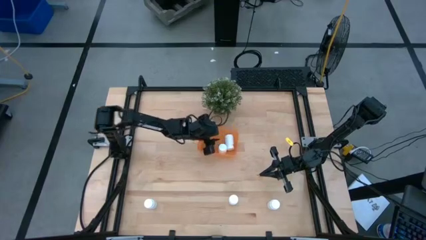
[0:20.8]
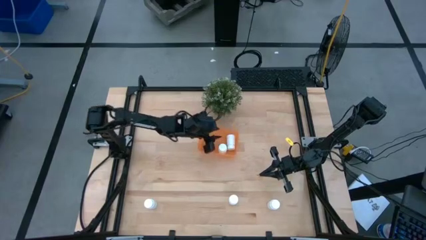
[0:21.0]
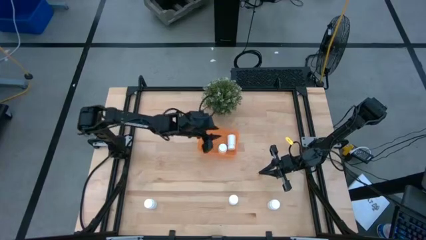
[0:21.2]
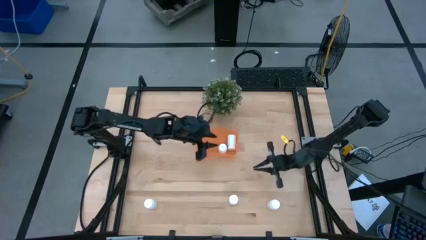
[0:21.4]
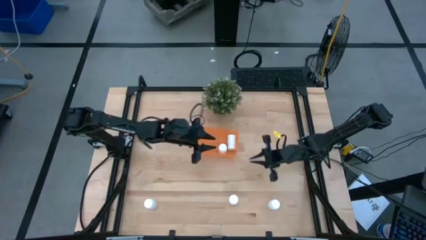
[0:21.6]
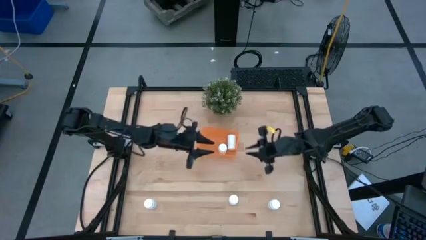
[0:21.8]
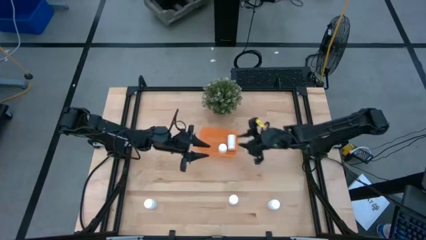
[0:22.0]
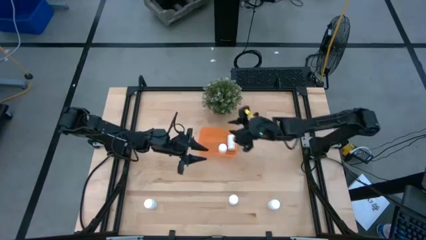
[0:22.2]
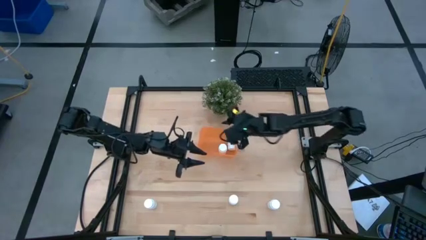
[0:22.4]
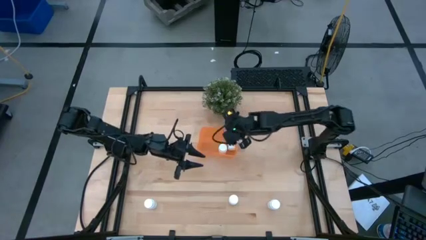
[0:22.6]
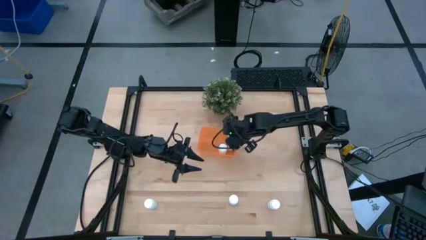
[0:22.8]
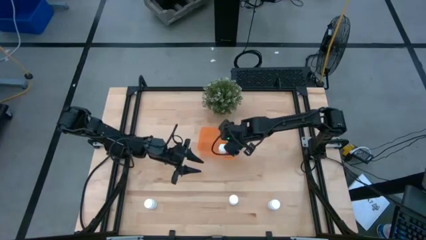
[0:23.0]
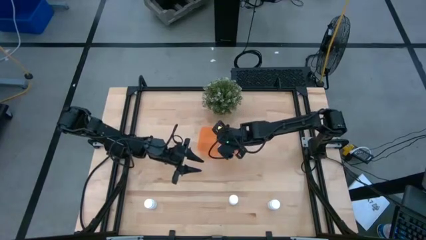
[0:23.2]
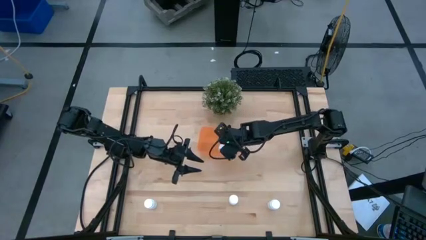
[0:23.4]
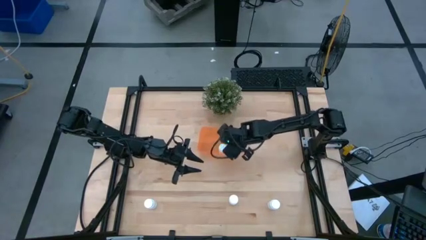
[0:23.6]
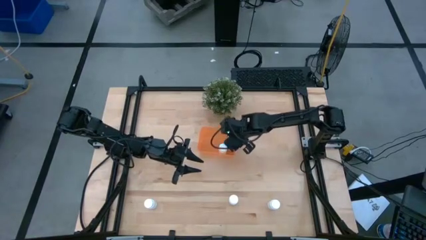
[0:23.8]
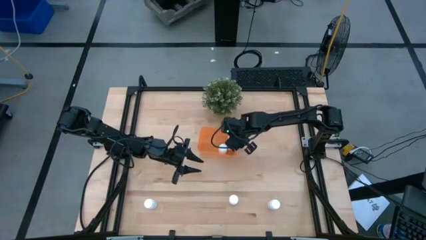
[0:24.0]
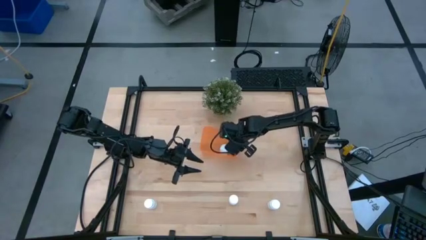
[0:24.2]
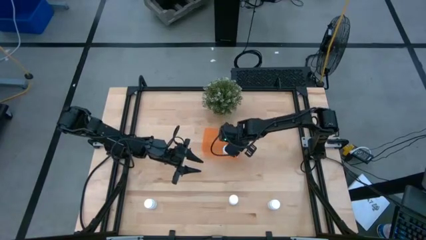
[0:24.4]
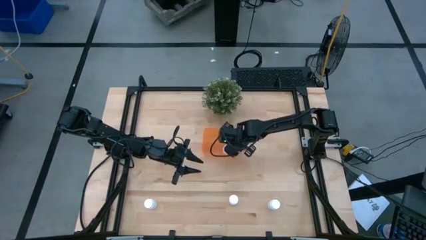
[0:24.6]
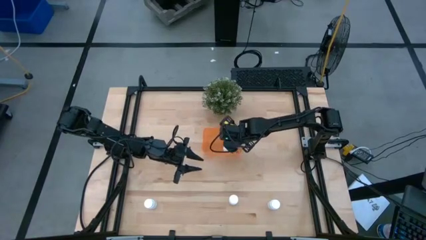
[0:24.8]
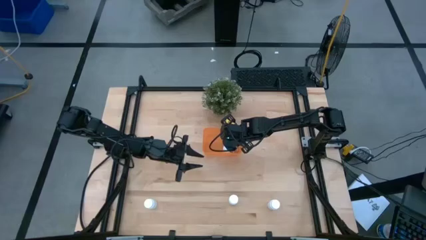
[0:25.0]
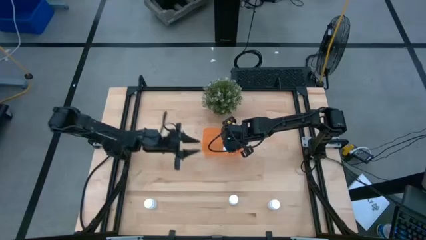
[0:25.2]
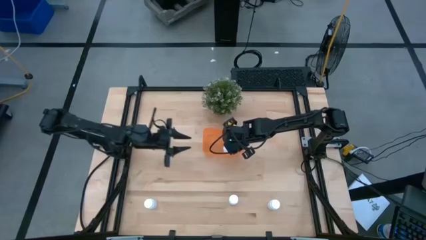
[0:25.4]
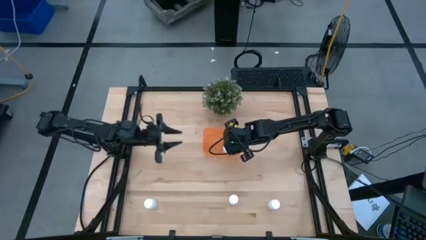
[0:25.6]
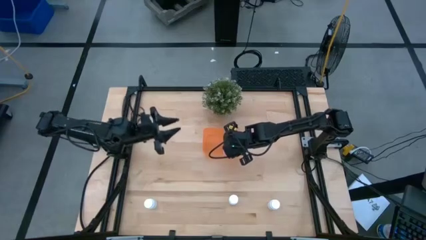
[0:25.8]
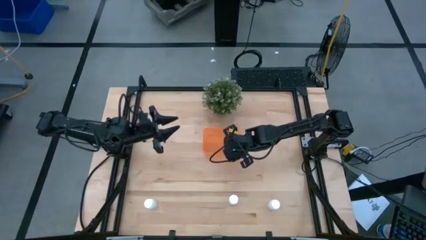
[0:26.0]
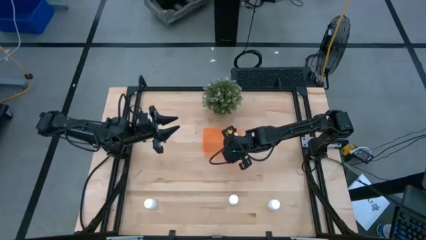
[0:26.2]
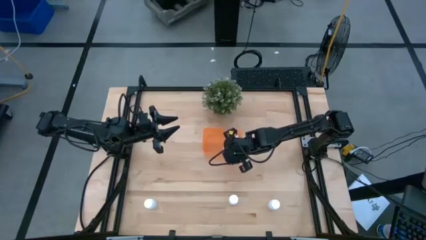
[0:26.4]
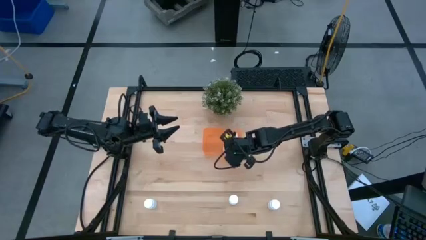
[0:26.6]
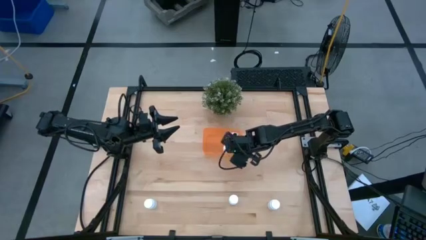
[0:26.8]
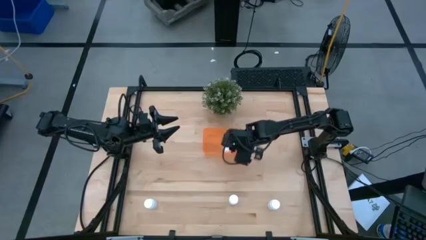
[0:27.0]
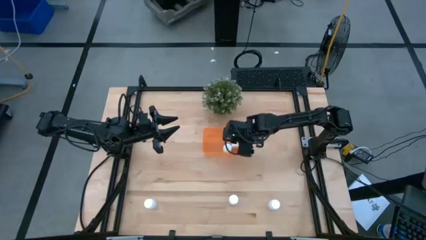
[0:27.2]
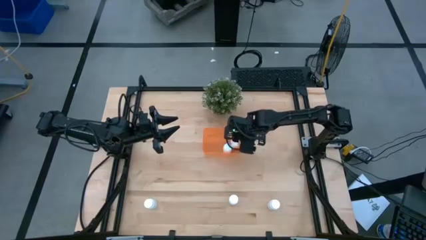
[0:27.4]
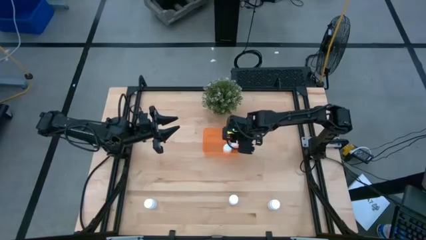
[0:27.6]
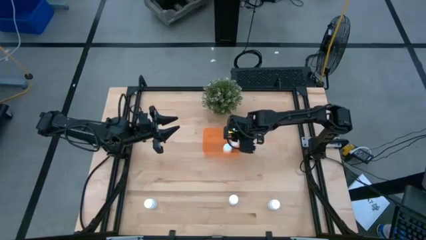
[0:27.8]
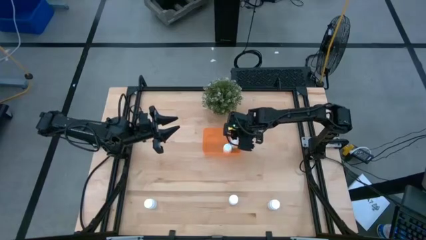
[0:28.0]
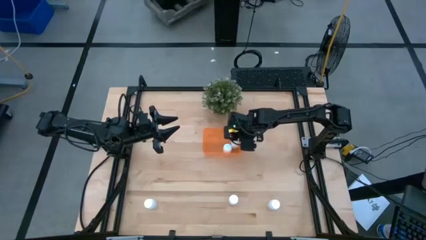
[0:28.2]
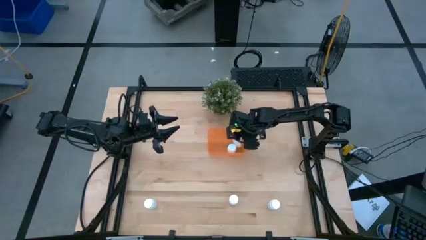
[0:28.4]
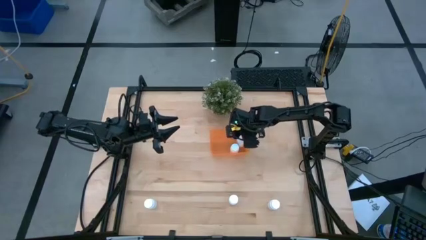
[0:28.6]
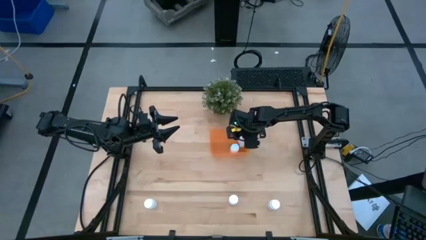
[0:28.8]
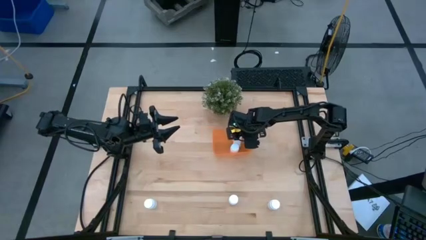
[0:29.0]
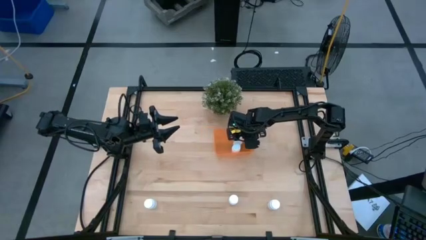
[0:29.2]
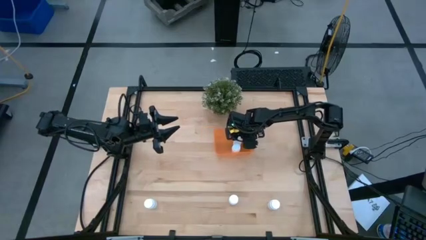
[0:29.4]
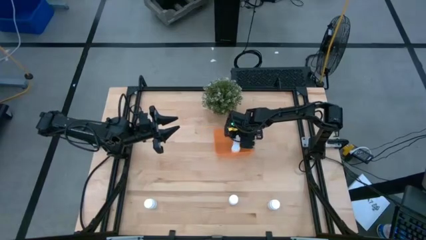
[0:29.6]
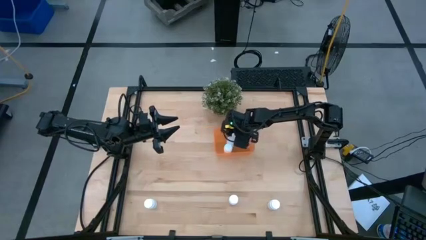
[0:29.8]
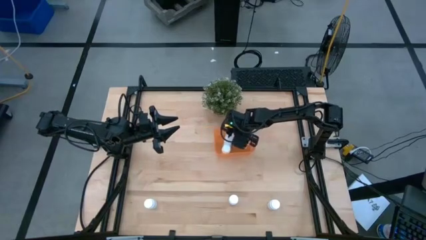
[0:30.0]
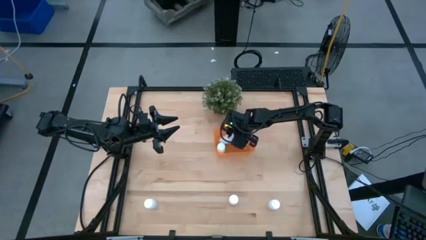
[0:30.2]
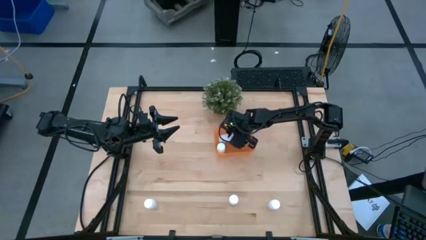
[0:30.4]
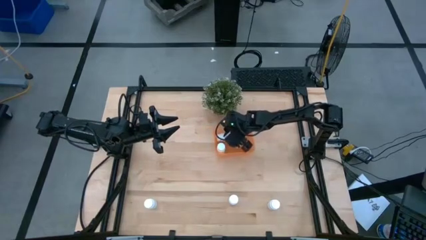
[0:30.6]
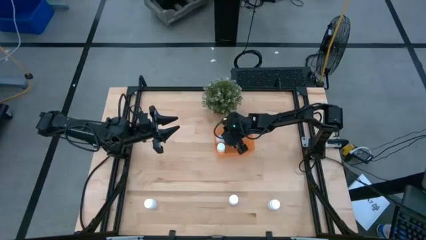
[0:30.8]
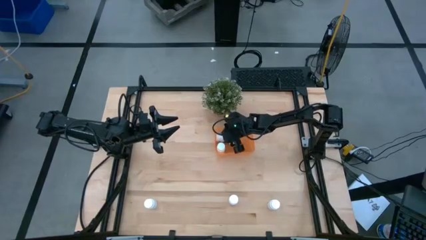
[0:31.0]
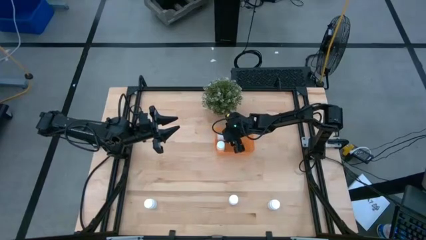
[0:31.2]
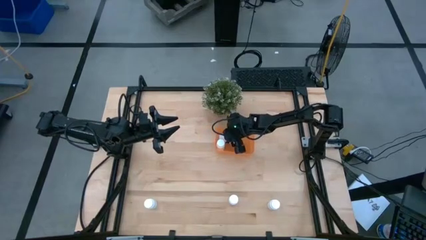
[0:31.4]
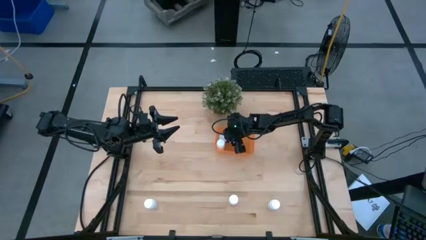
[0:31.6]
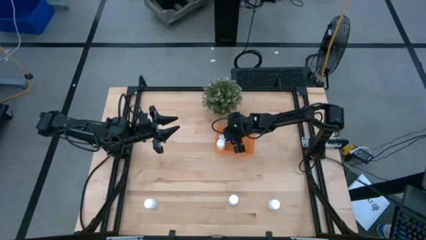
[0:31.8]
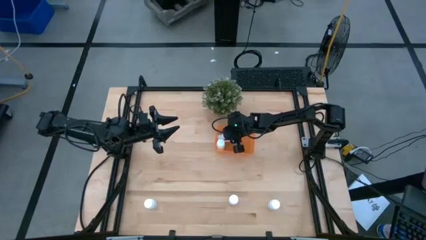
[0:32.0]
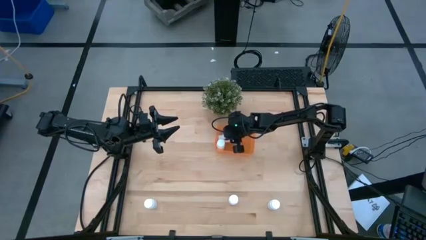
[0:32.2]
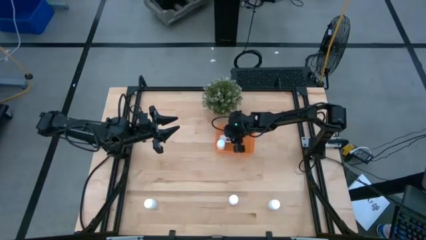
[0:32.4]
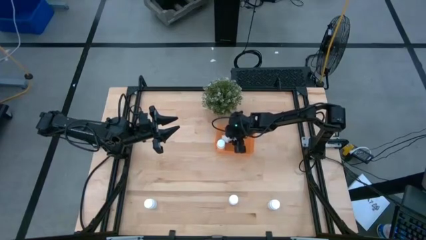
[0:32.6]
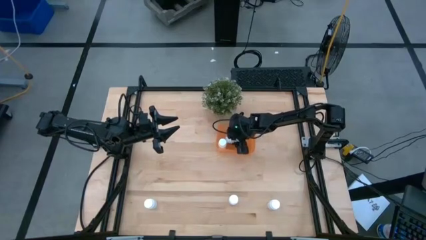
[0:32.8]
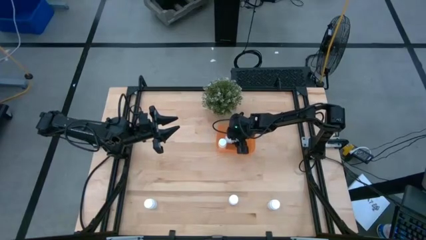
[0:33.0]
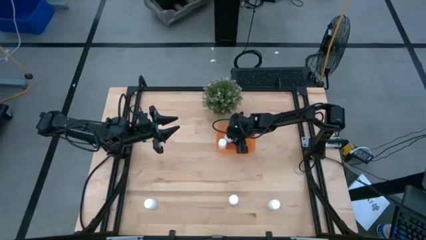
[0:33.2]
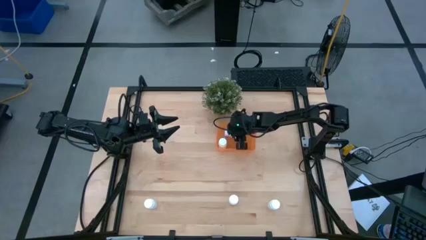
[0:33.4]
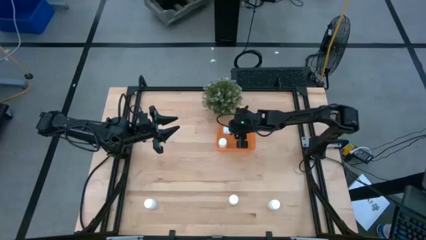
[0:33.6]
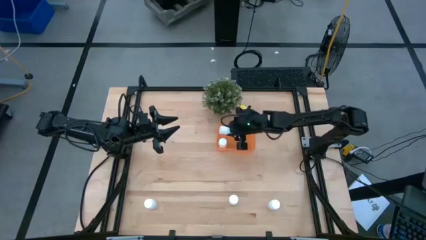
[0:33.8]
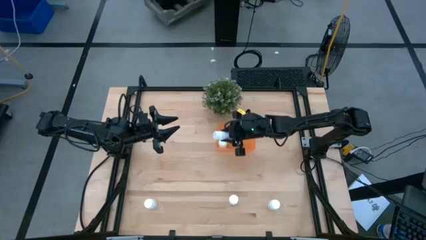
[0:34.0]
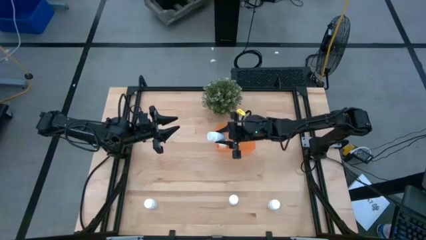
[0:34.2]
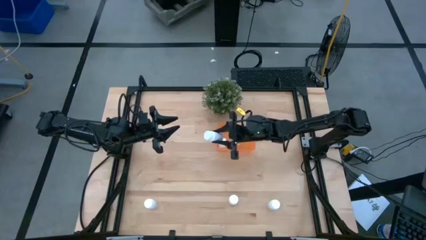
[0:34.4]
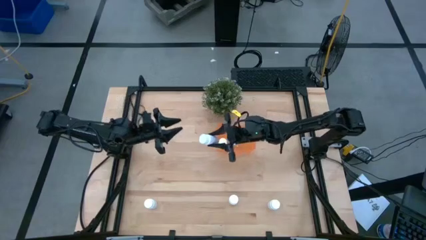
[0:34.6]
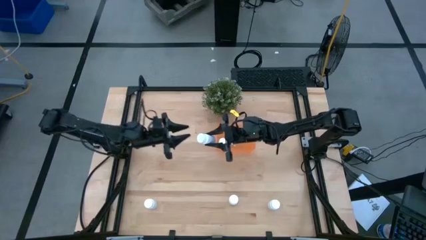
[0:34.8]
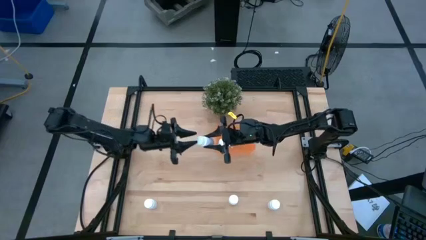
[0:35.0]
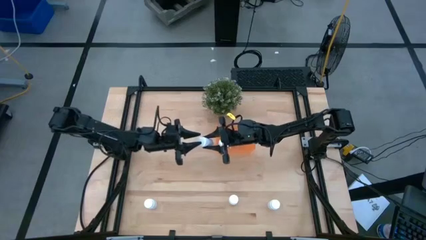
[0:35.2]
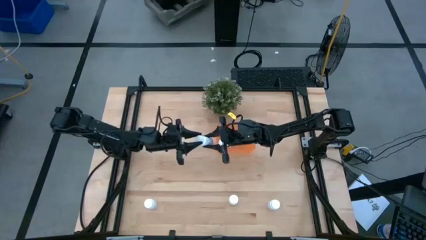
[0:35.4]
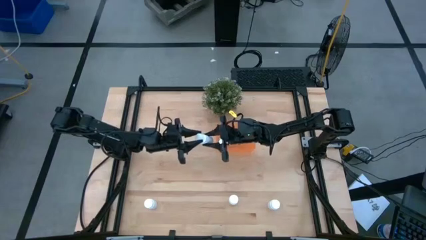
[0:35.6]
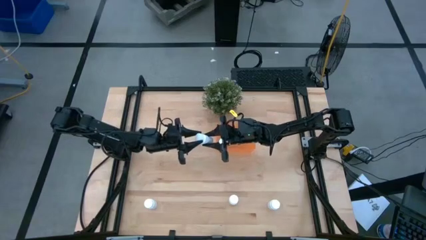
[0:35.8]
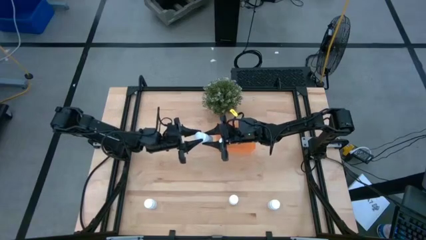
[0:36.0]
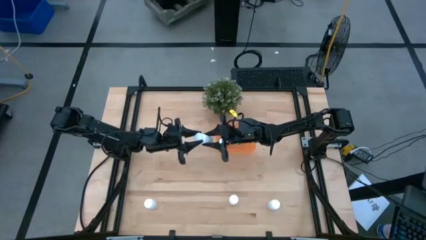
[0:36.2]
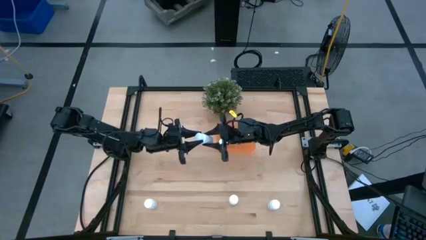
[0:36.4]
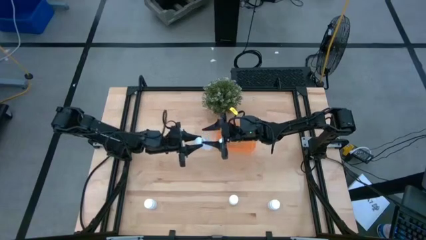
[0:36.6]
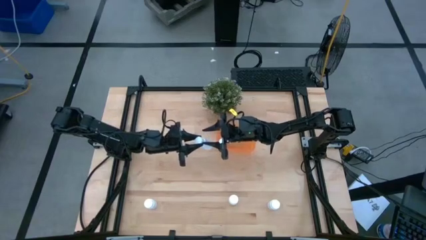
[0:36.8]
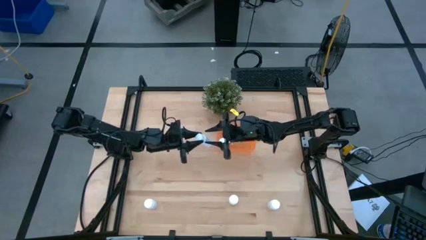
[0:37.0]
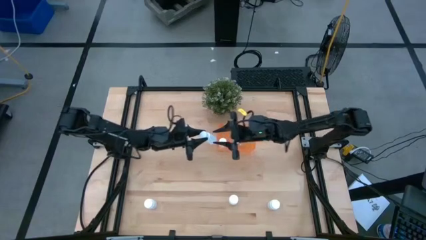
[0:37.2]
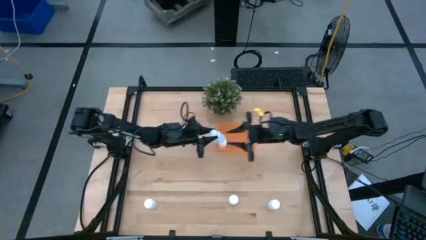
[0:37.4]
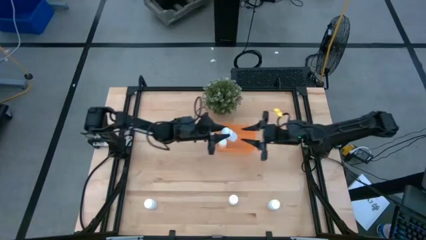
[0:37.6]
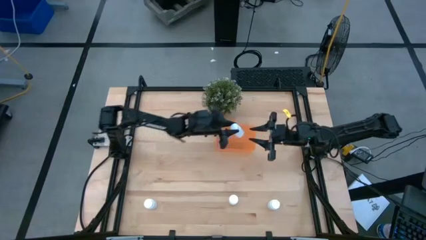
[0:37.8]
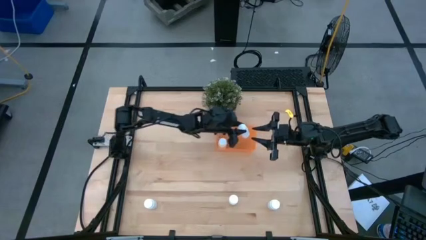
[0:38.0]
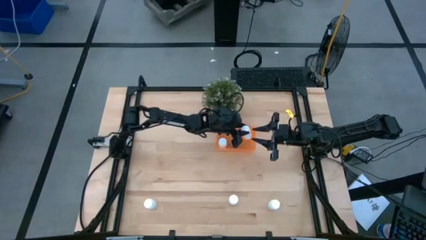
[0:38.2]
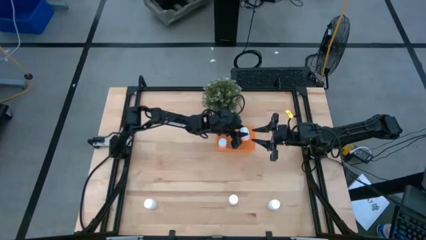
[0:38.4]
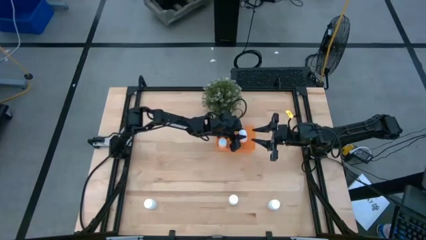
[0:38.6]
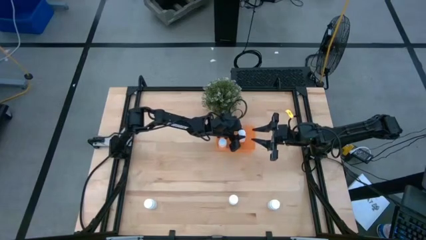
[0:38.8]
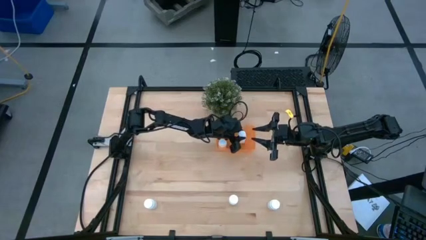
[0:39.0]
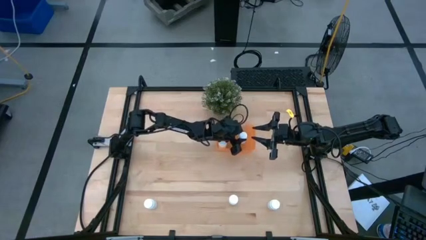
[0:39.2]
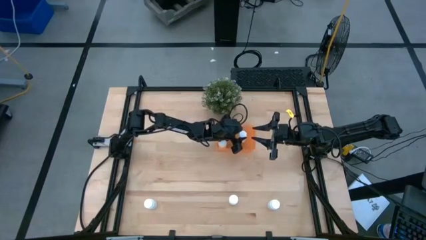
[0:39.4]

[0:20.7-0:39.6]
Task: Pick and place pill bottles into a basket
Put the white pill bottle into the orange bin
